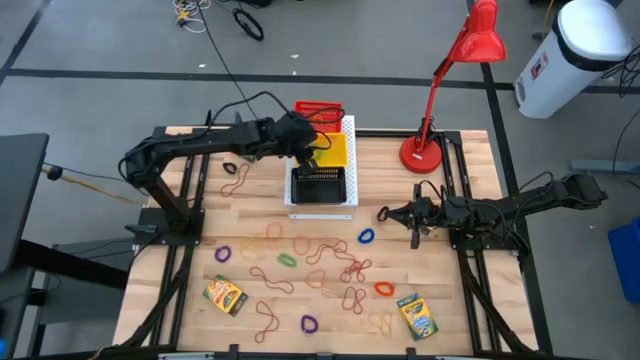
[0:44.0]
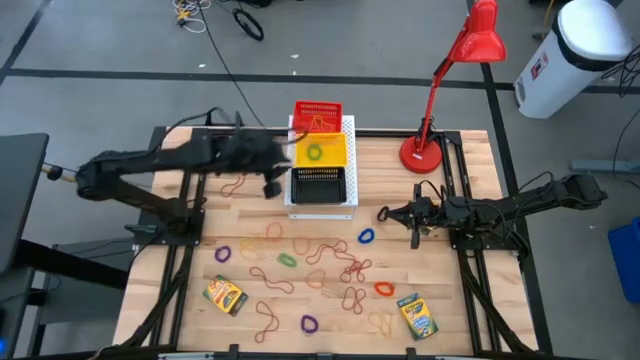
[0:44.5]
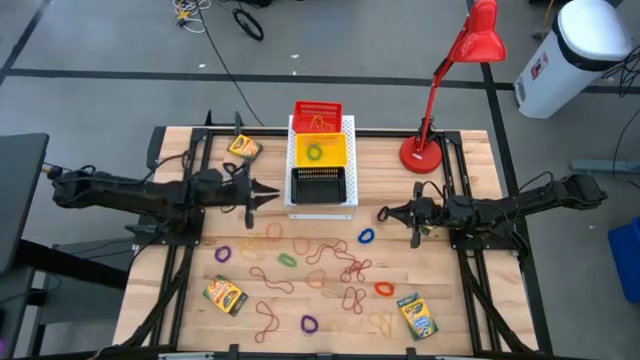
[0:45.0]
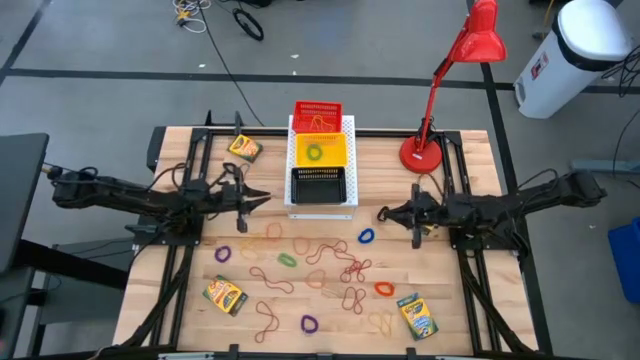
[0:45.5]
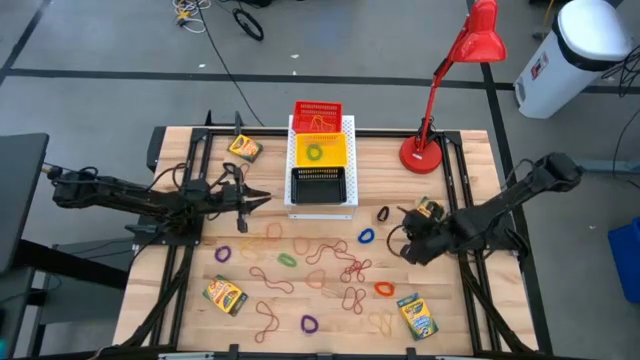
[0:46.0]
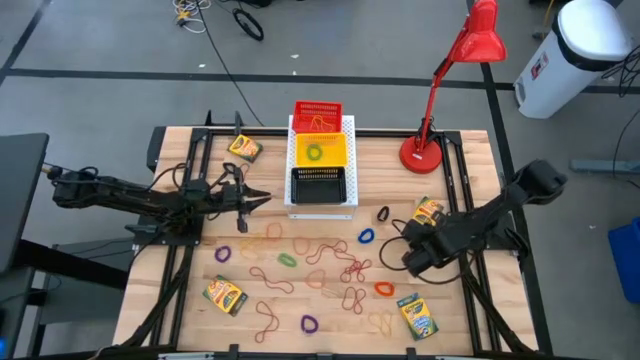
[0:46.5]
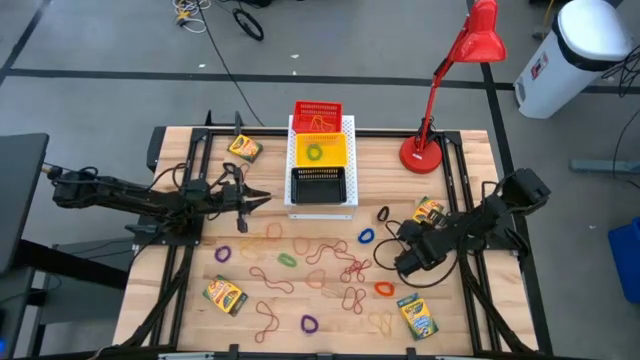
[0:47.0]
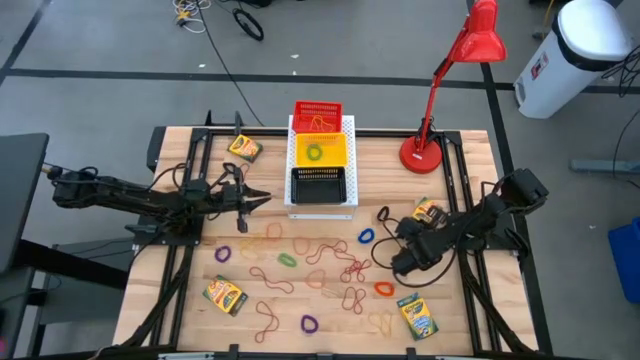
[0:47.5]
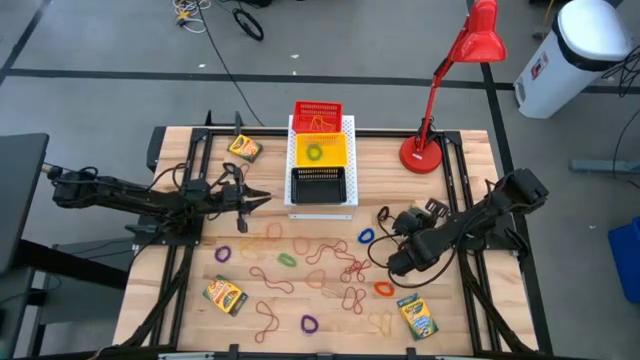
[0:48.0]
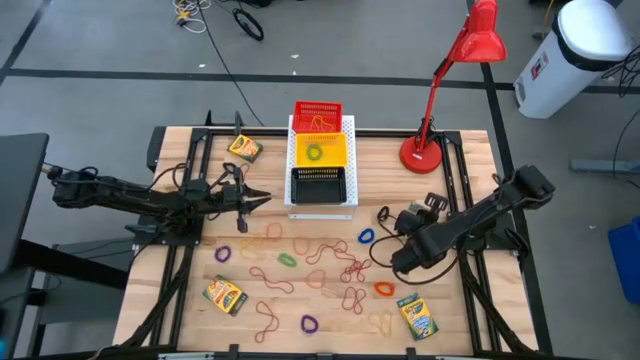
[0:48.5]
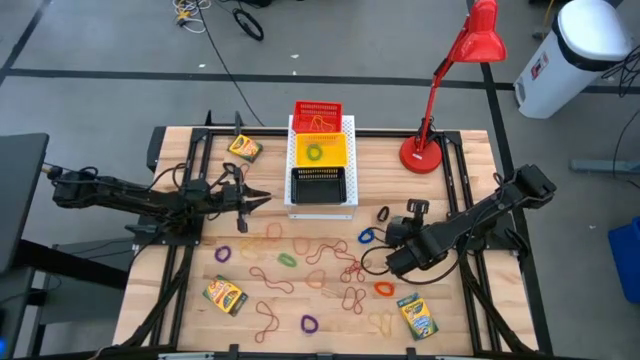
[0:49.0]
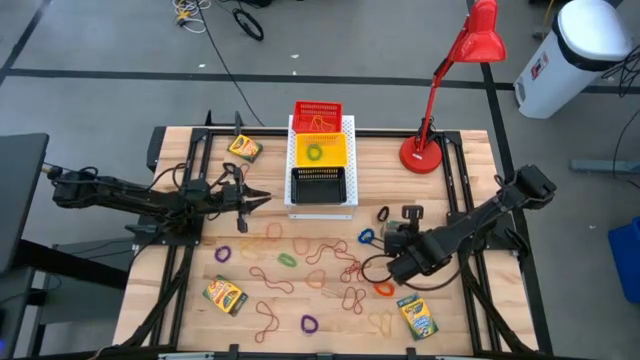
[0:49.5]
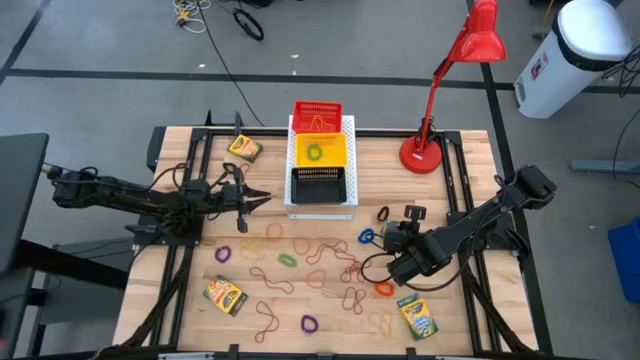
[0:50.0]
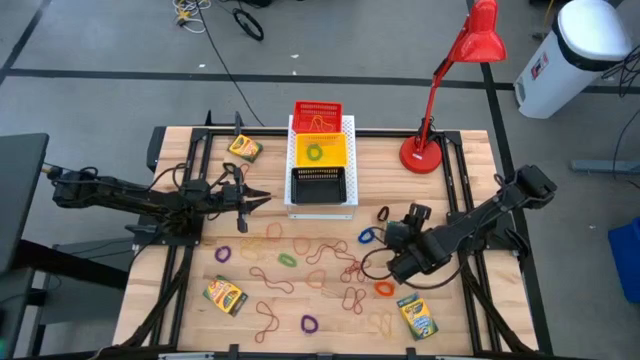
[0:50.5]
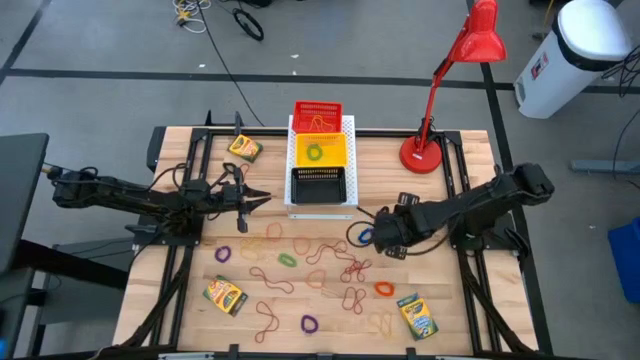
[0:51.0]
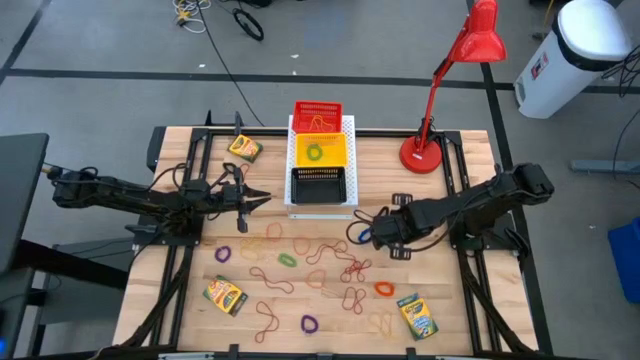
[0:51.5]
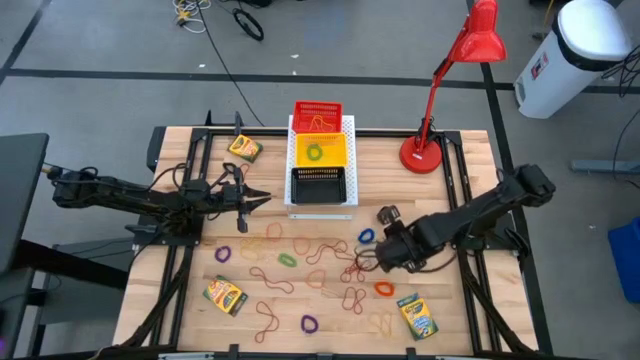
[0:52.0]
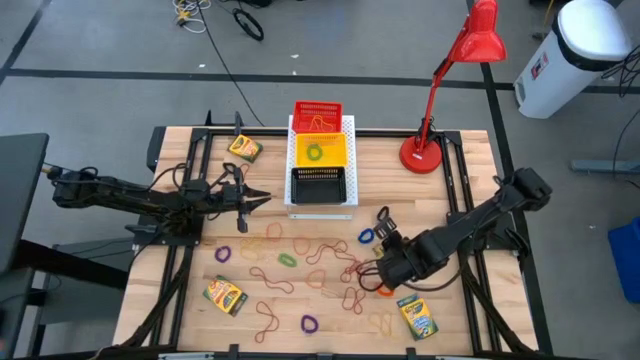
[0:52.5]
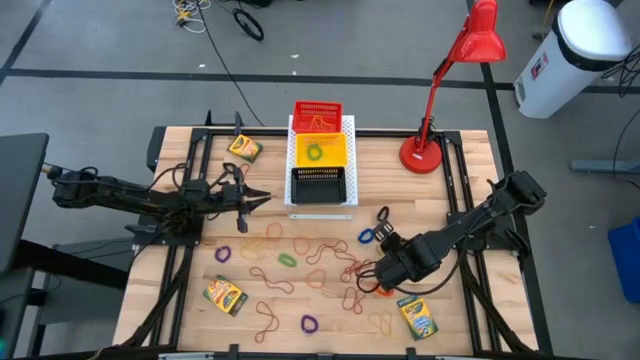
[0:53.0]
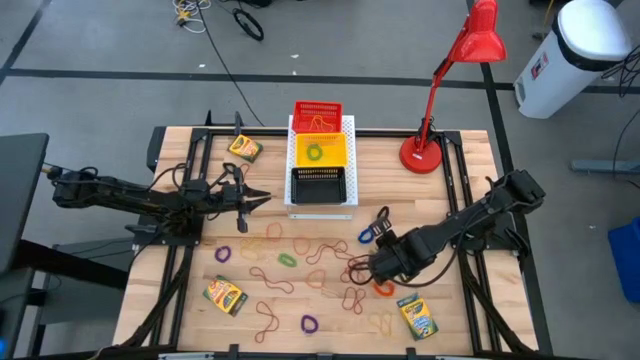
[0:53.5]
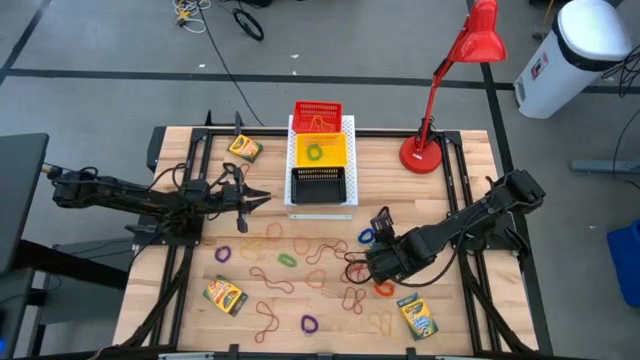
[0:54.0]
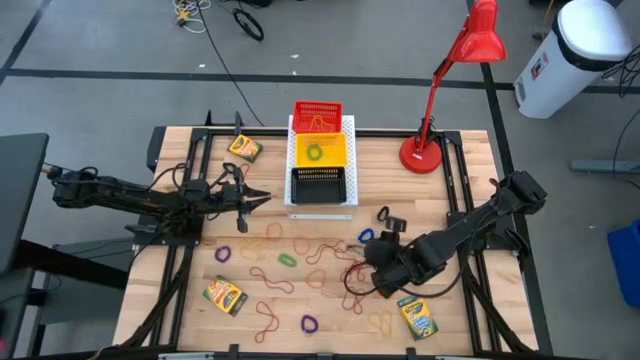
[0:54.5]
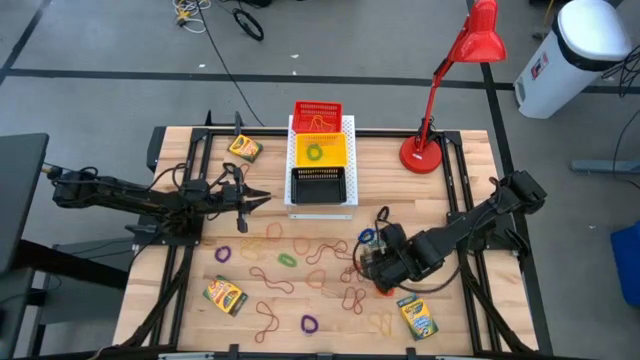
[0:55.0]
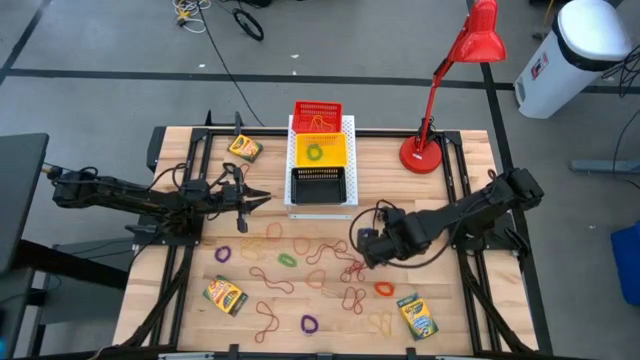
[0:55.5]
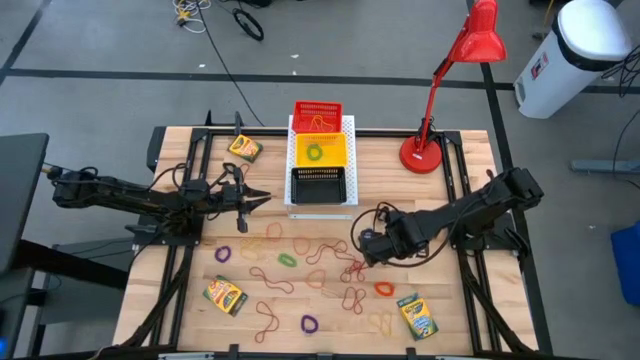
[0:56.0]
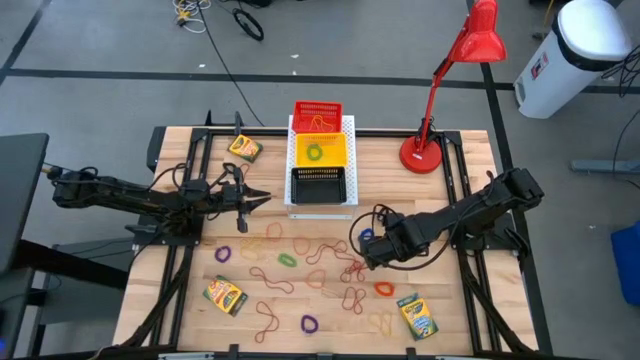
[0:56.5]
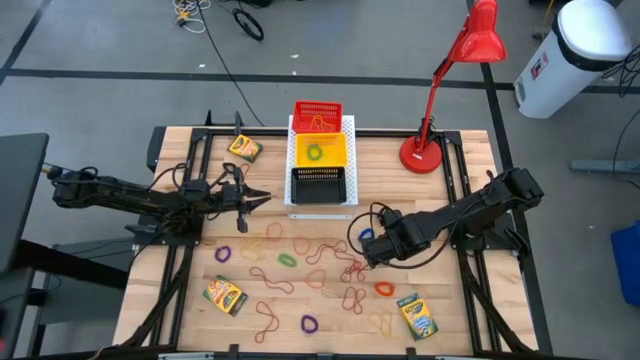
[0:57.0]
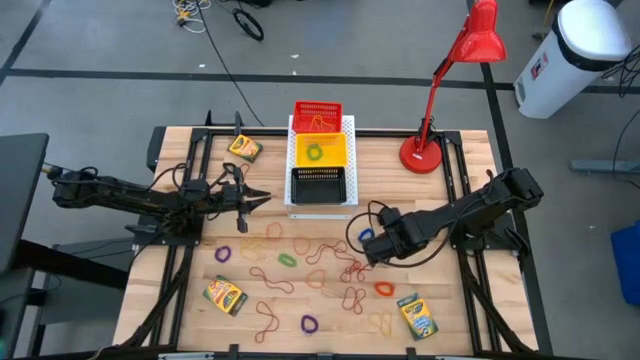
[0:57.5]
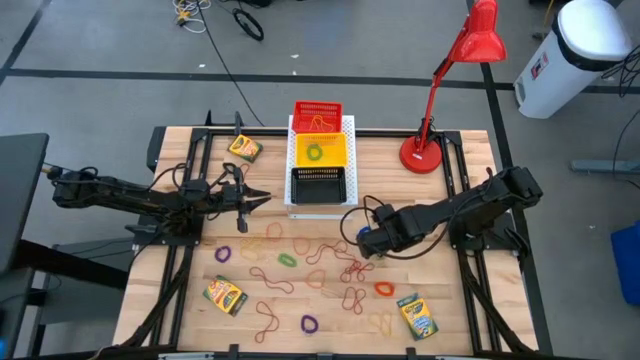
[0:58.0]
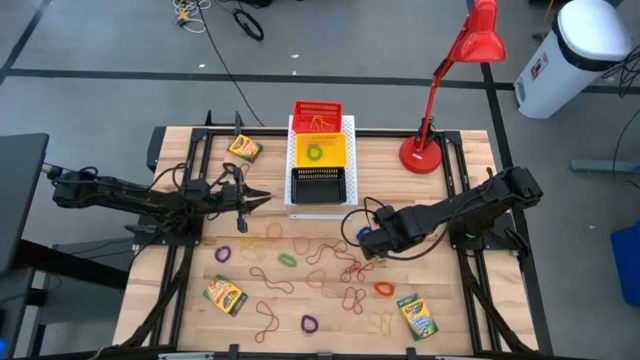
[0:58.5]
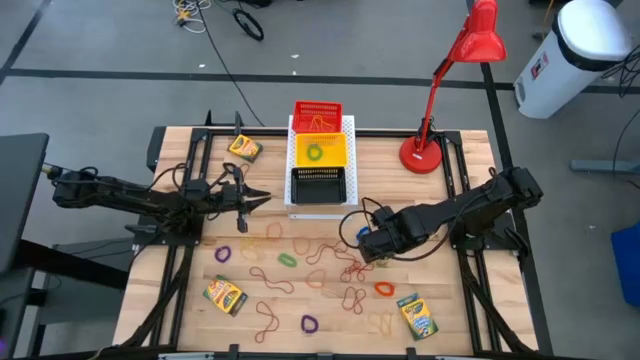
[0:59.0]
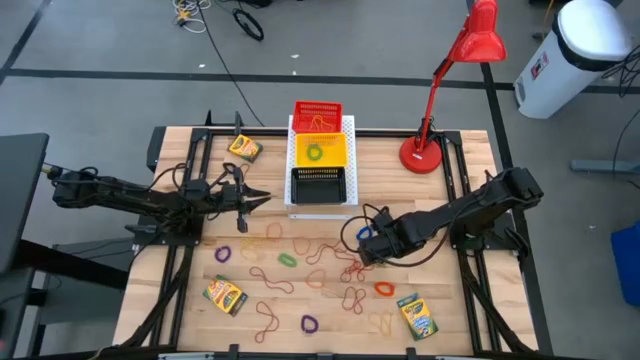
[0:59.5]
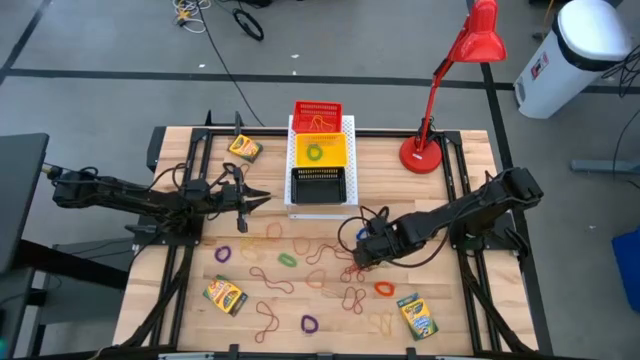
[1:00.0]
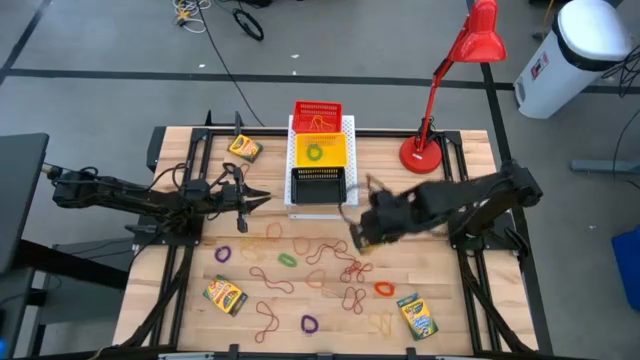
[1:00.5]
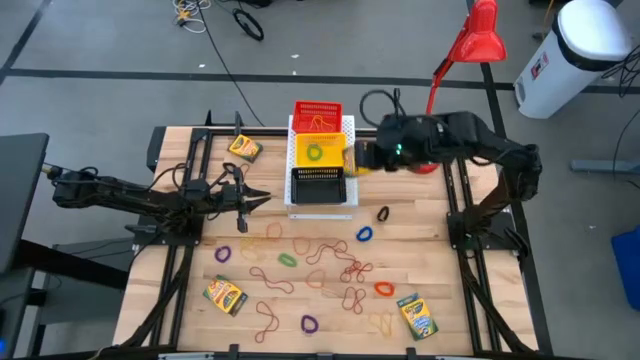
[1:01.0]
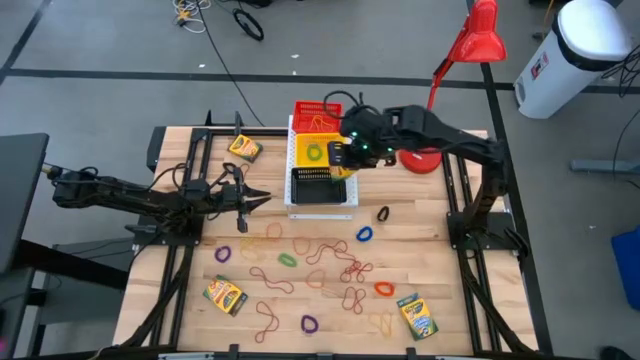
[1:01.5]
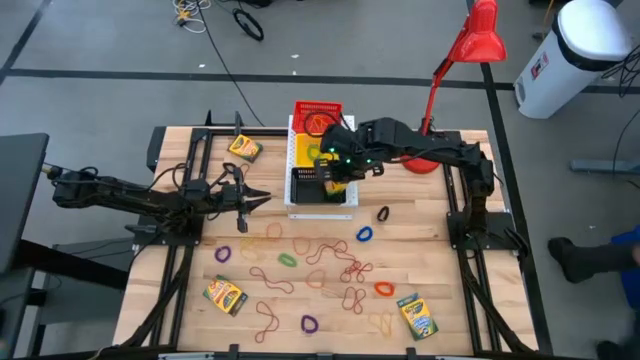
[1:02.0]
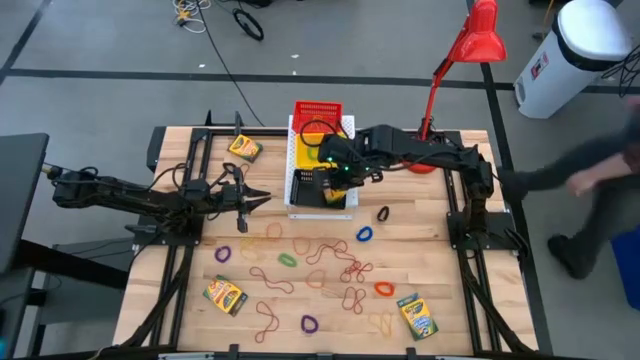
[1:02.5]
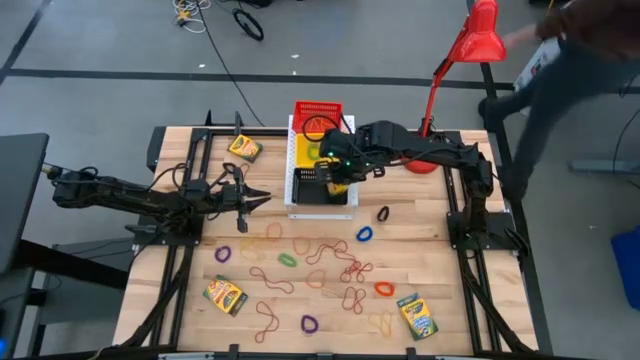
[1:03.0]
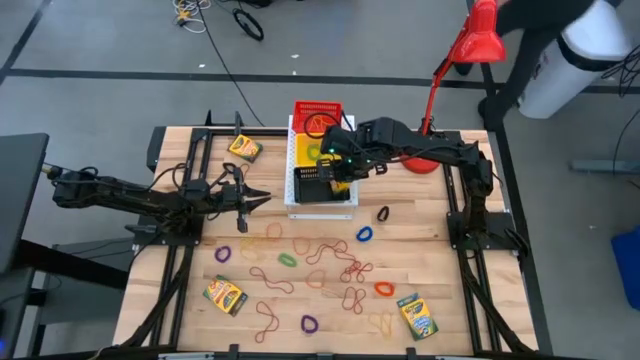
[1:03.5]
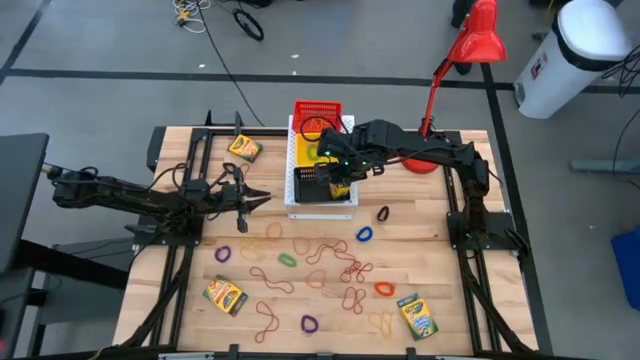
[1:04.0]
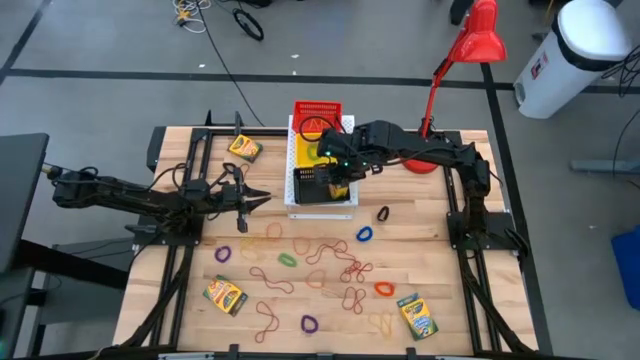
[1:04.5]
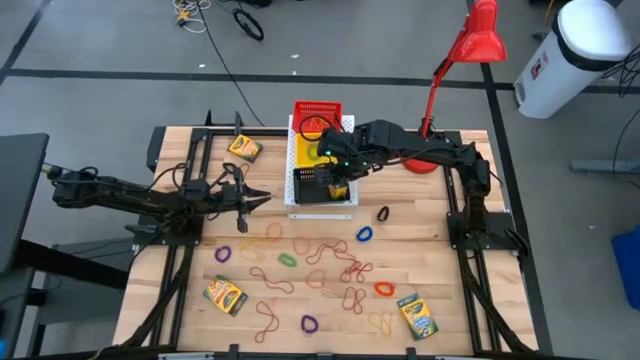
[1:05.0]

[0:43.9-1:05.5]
Task: Pick & Place Office Desk Supplies
Put the yellow crayon box into the black bin on the shelf
